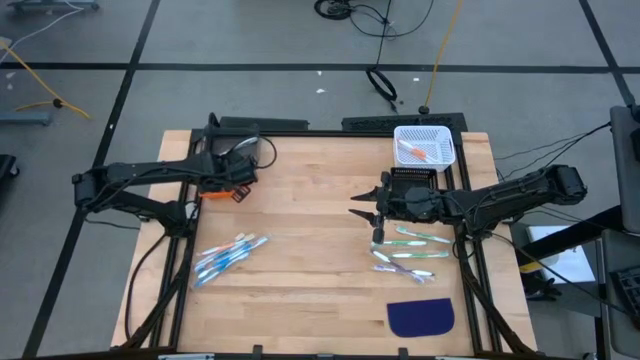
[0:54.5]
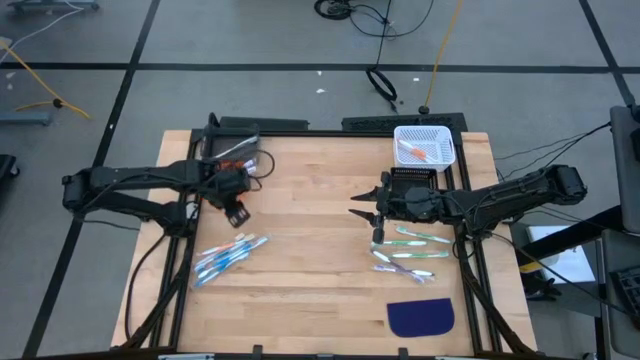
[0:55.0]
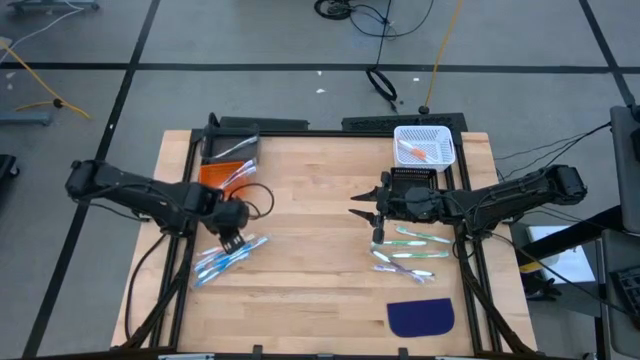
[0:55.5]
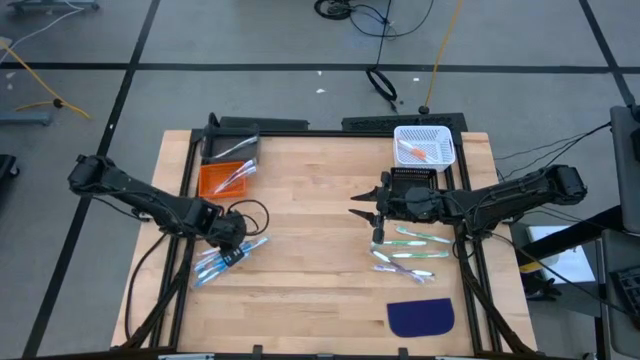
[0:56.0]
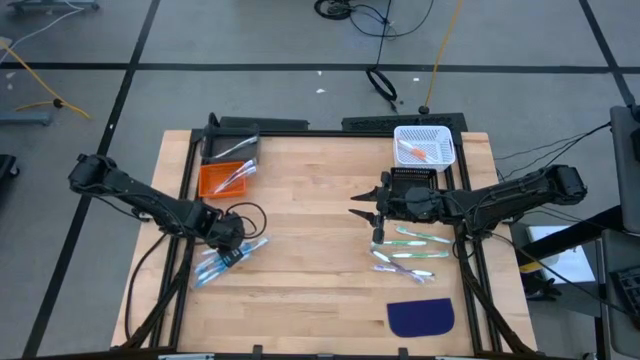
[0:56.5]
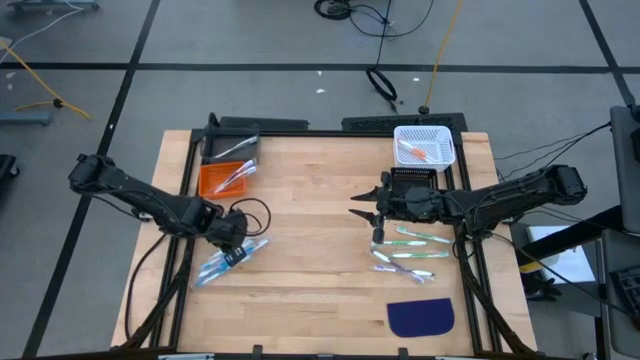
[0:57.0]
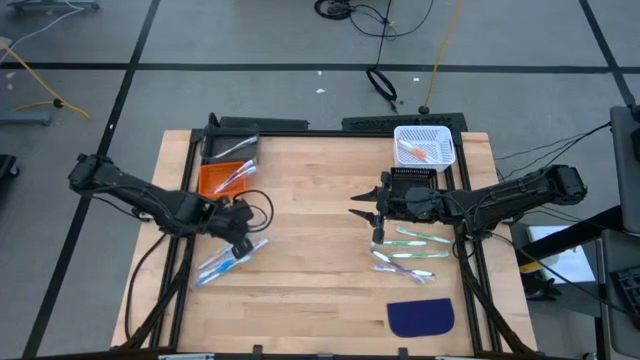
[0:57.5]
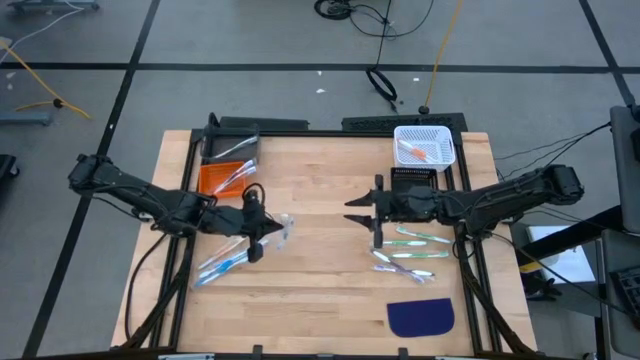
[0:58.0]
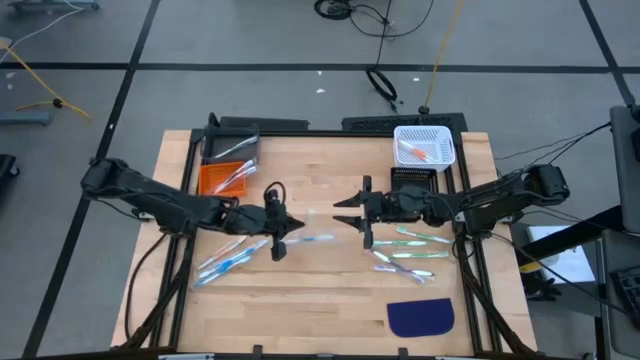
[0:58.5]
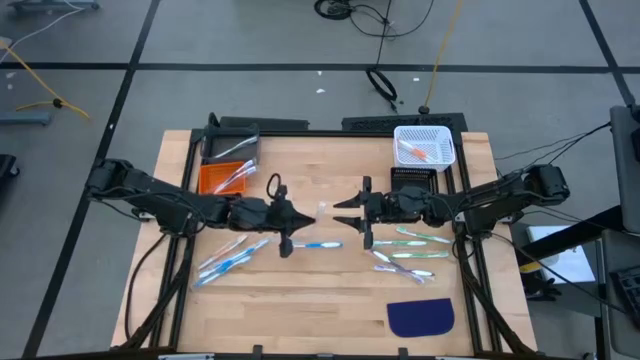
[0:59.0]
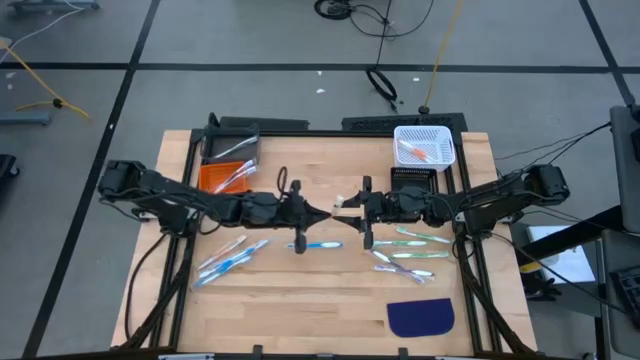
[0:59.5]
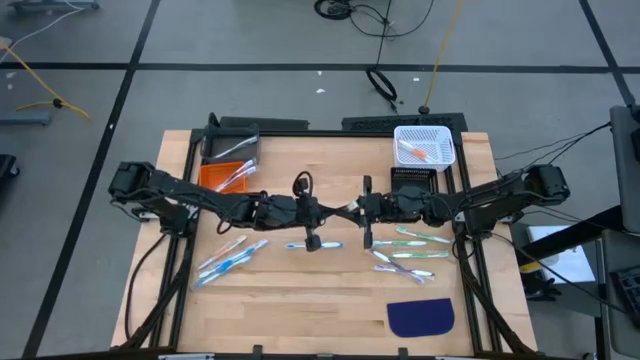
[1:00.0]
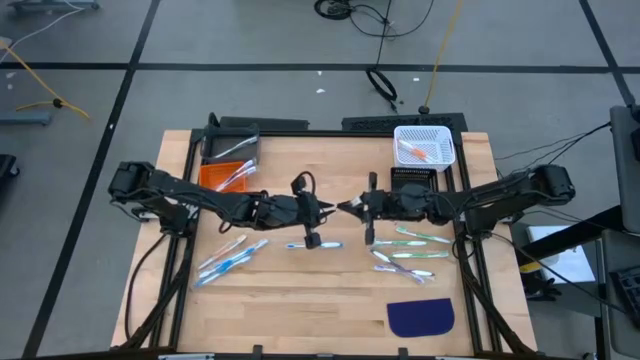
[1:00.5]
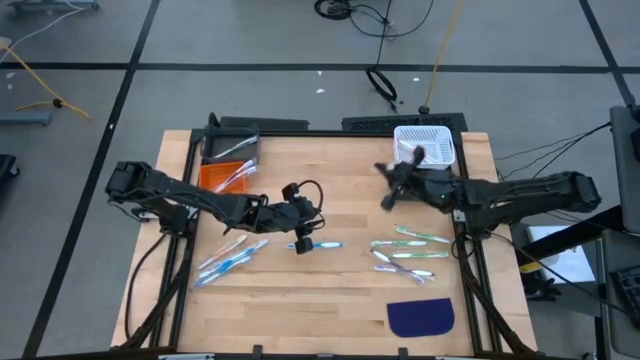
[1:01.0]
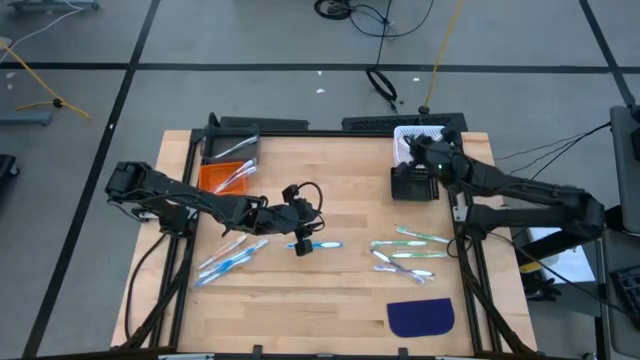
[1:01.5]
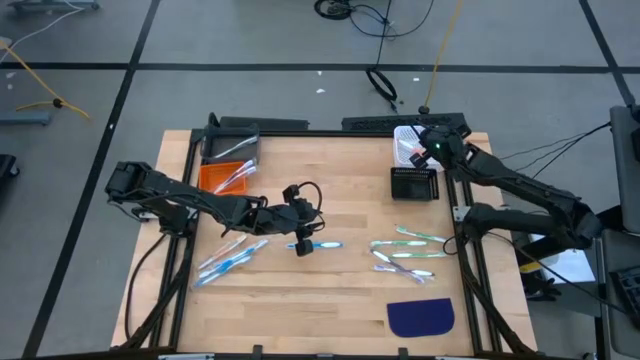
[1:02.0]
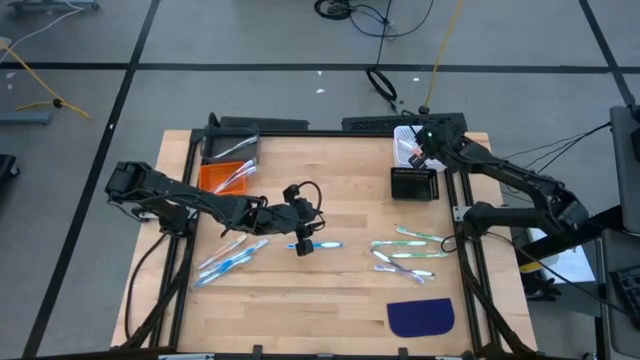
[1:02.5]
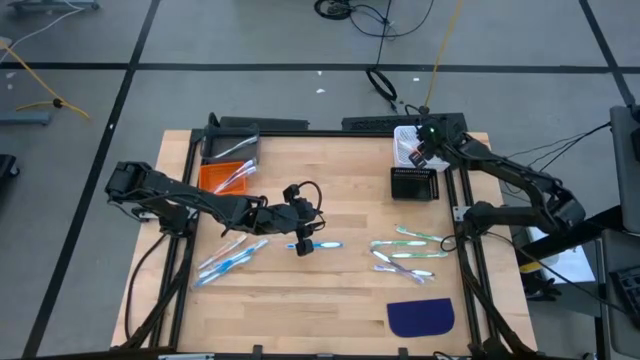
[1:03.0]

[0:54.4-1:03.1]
Task: Pick & Place Toothbrushes
Put the orange toothbrush into the white bin

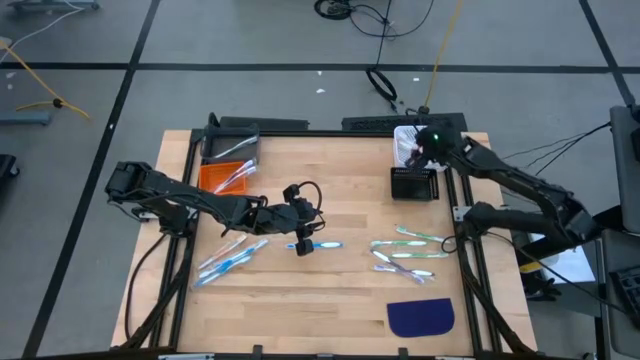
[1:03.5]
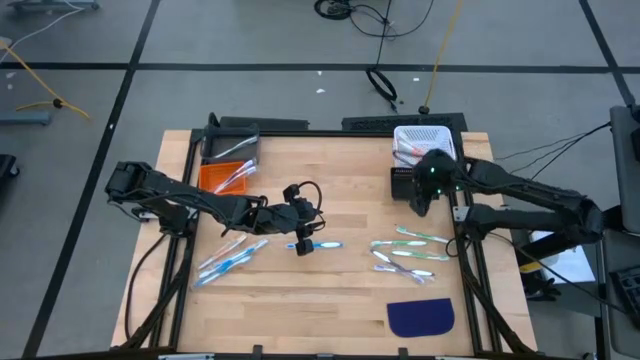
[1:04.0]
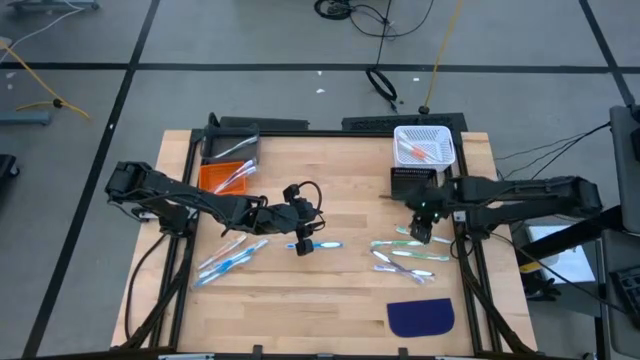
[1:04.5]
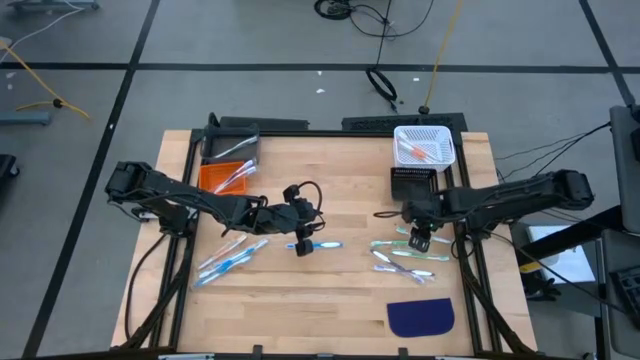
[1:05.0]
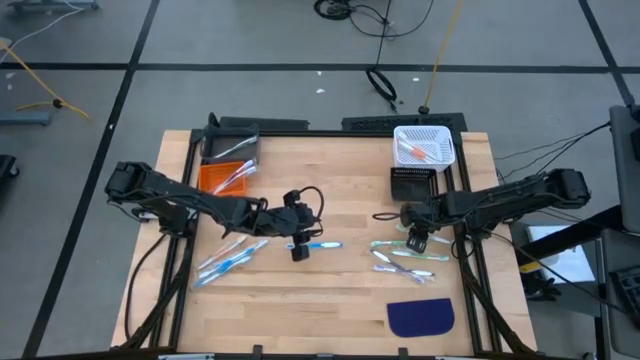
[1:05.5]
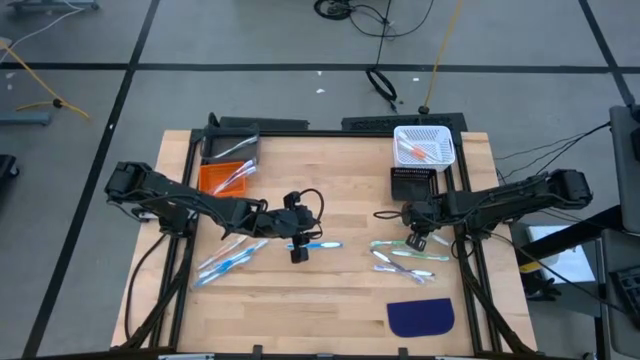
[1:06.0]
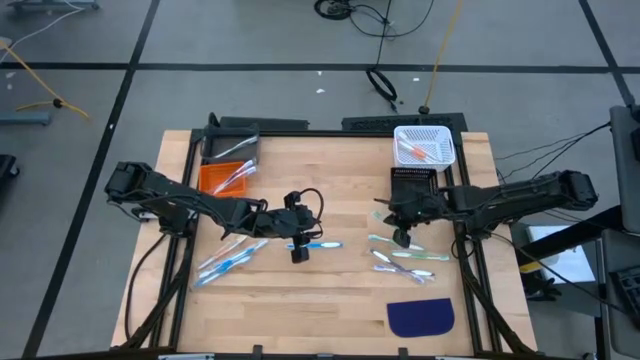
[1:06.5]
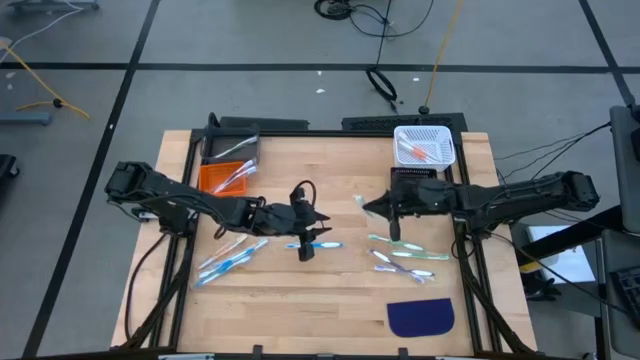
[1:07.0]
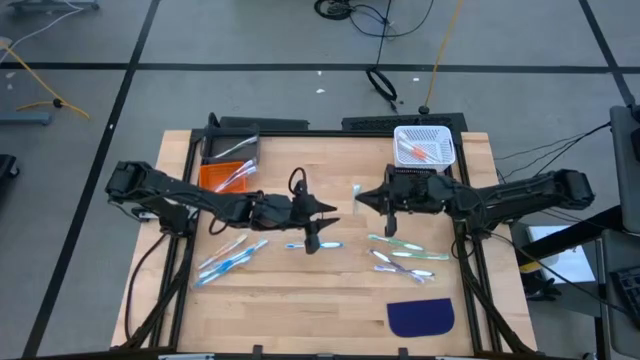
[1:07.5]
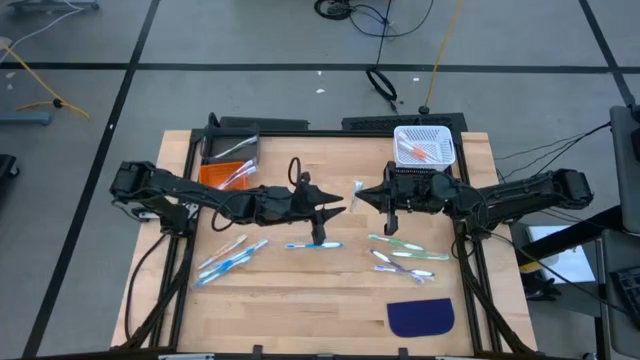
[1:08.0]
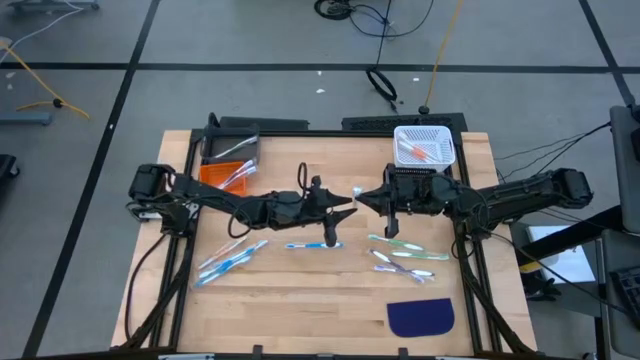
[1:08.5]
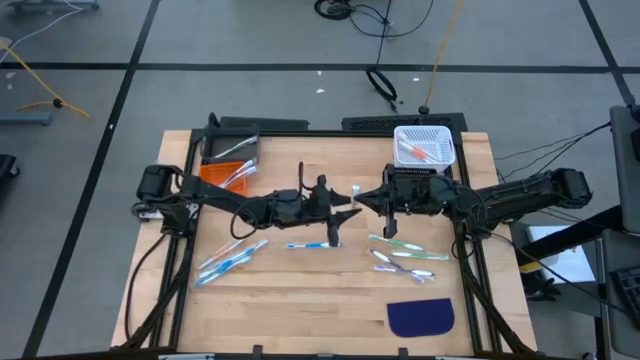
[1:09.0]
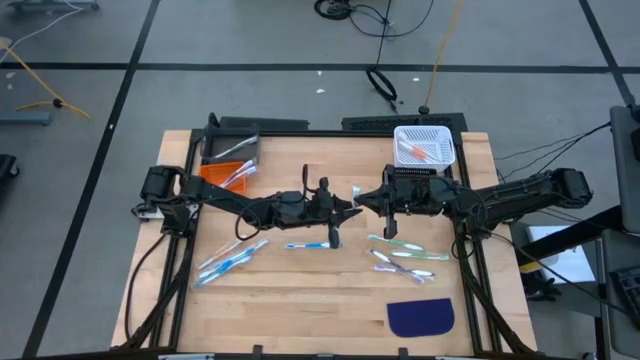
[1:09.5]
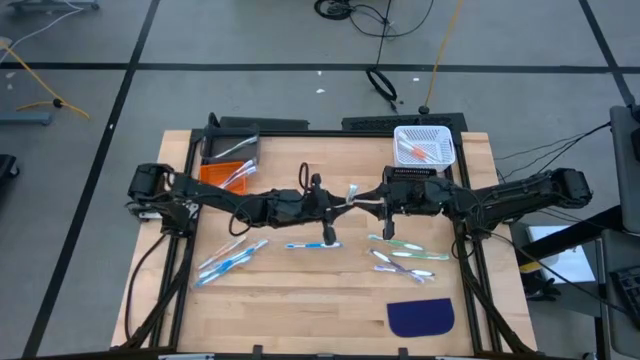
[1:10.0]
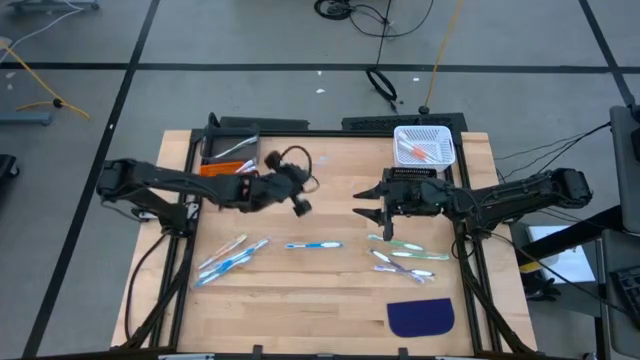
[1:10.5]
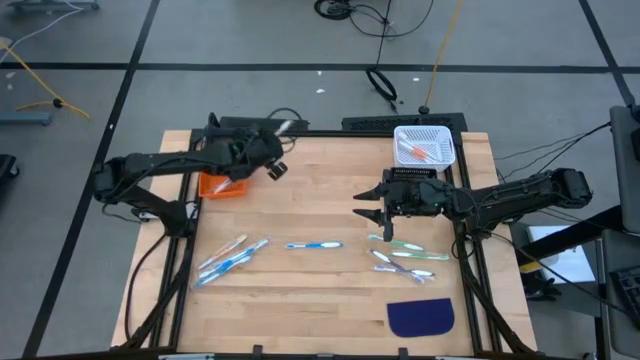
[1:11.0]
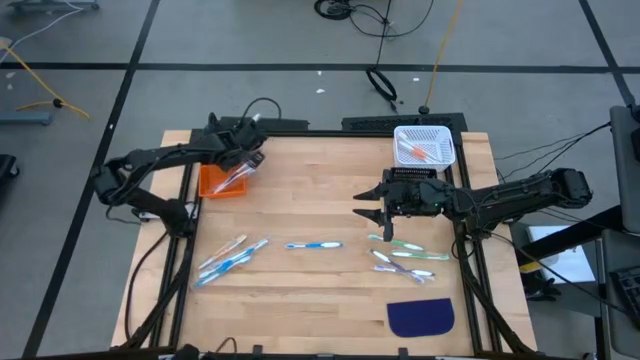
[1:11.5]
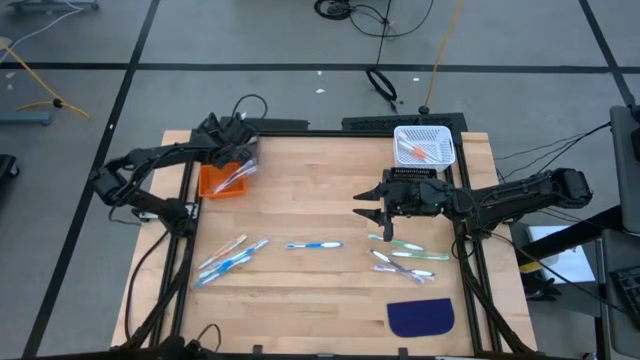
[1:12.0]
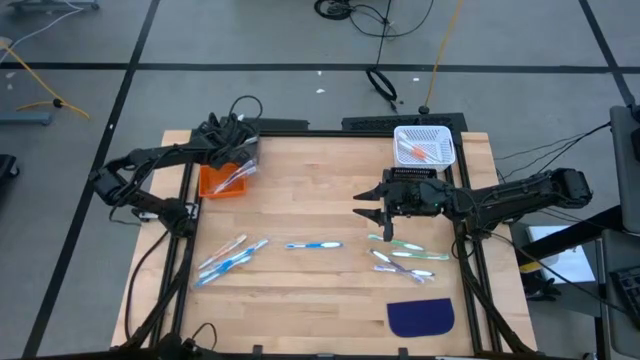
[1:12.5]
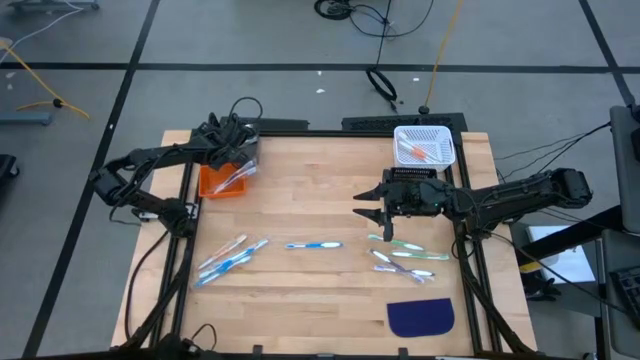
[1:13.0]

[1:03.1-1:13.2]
Put the green toothbrush into the gray bin

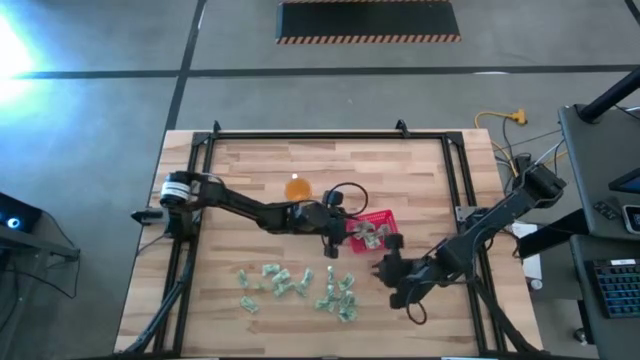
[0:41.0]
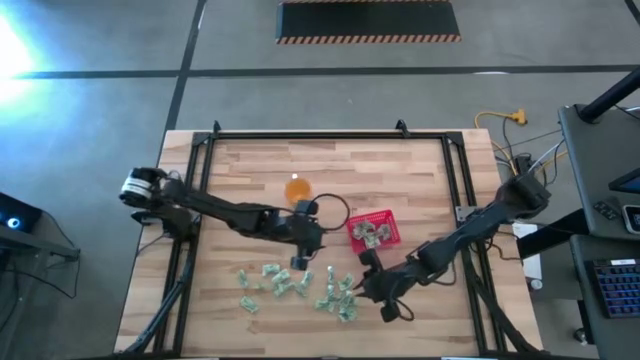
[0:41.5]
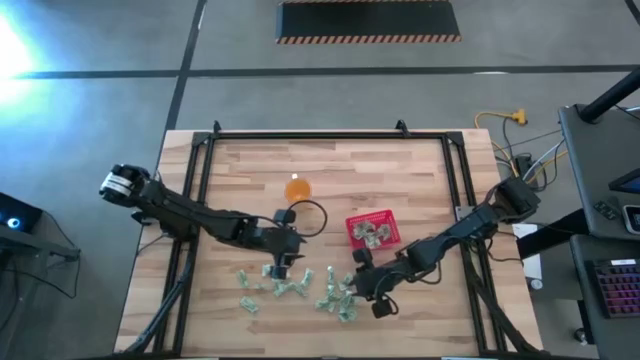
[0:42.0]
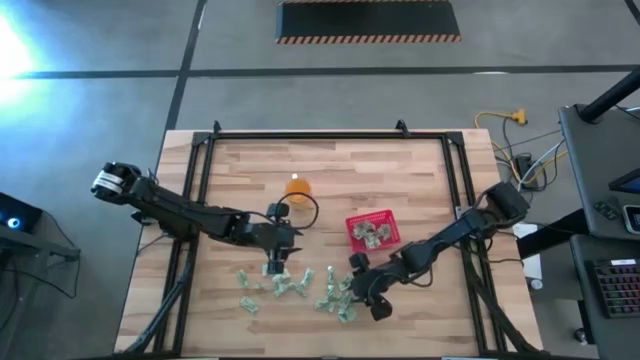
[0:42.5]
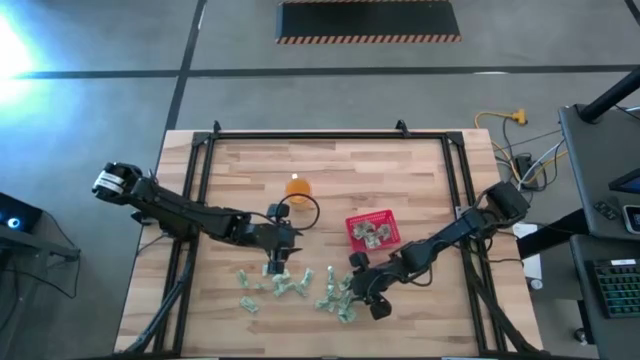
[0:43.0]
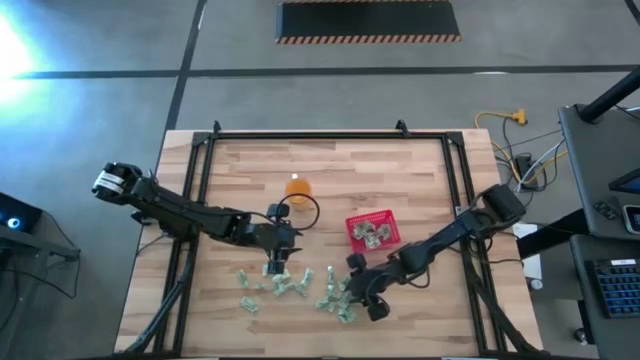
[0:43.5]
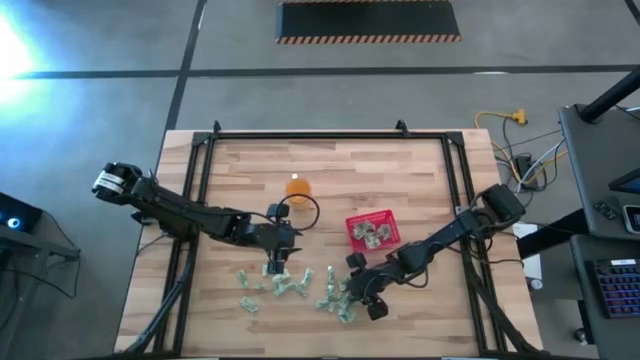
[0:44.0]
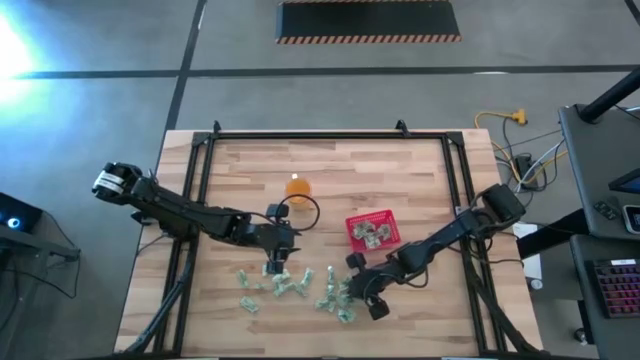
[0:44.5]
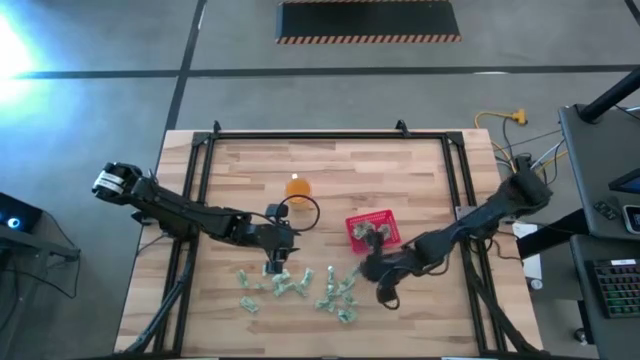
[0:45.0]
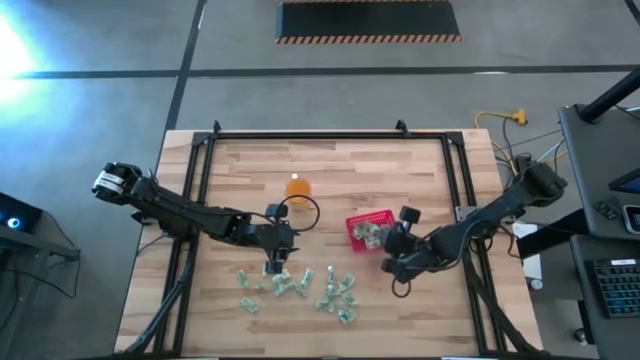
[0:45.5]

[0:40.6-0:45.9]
Task: Pick and place Stevia / Truvia into bins
Put the stevia packet into the basket
